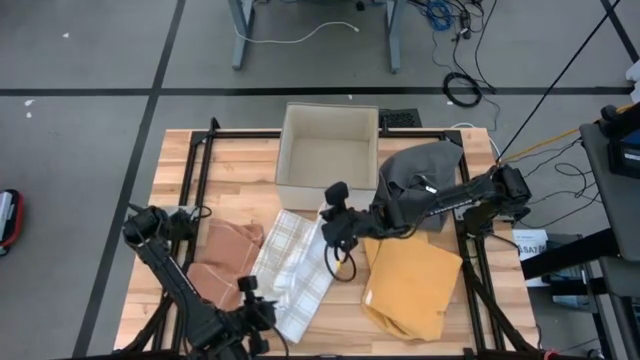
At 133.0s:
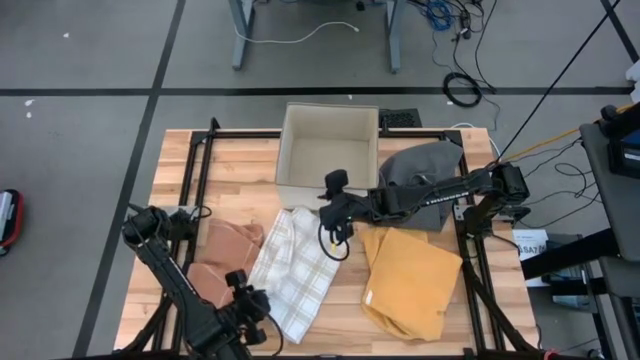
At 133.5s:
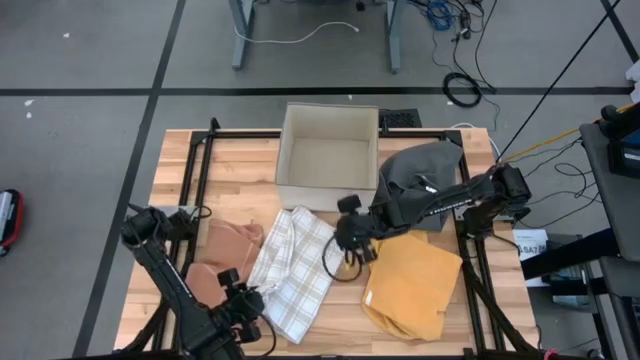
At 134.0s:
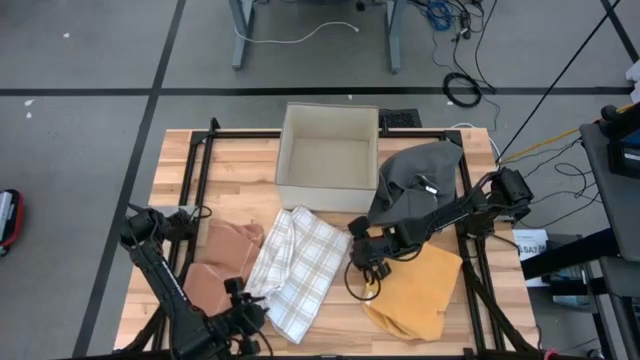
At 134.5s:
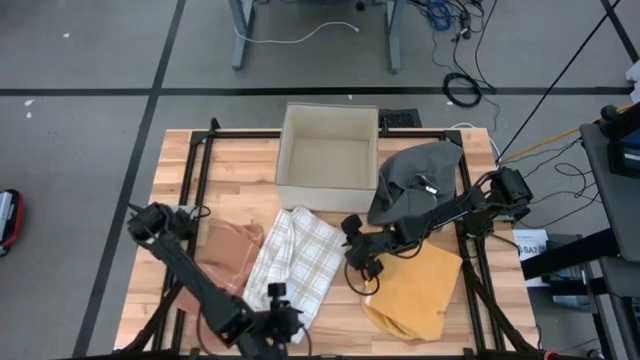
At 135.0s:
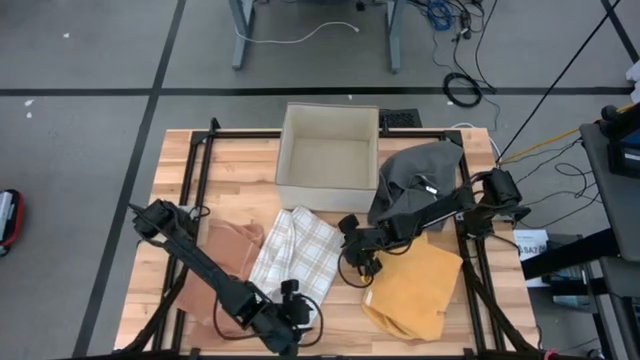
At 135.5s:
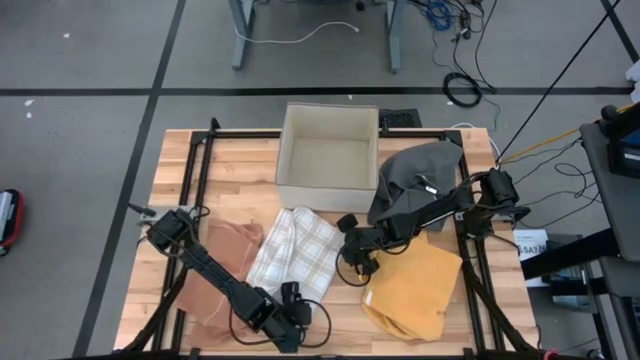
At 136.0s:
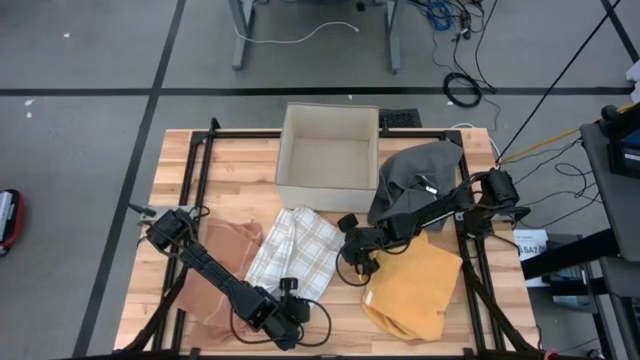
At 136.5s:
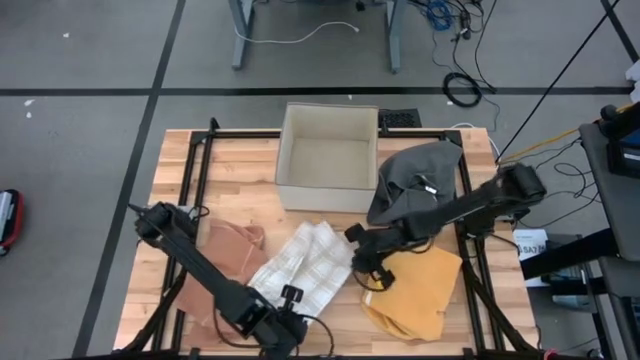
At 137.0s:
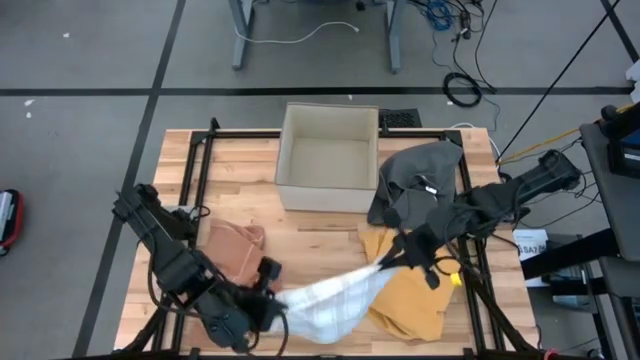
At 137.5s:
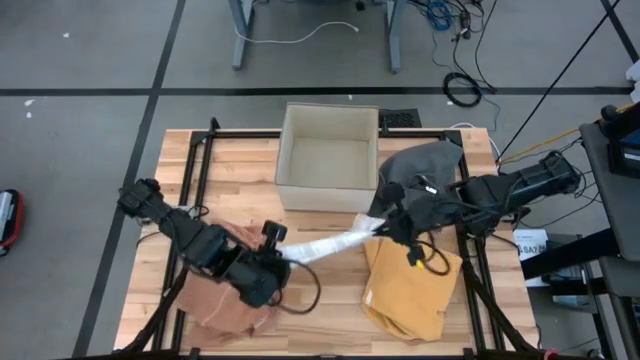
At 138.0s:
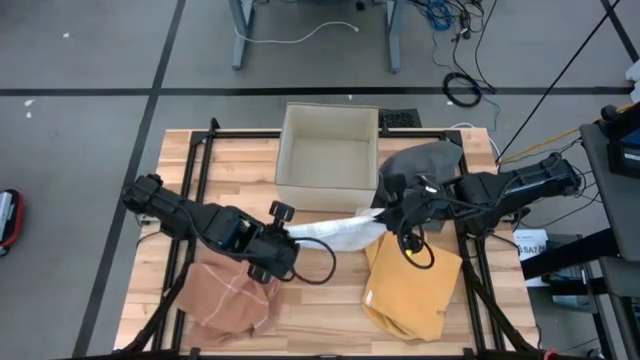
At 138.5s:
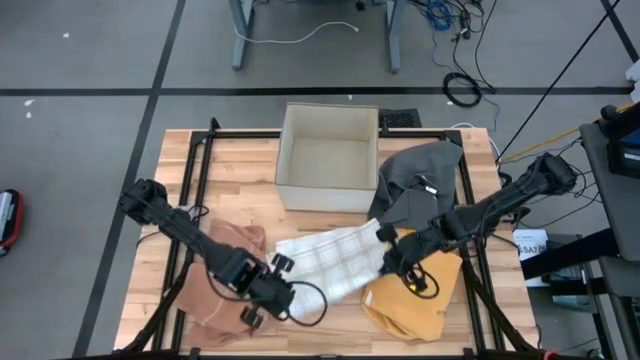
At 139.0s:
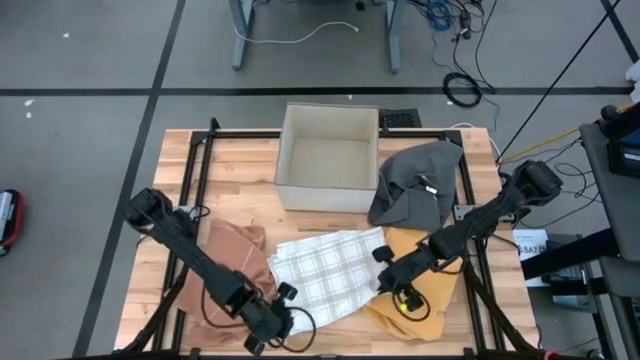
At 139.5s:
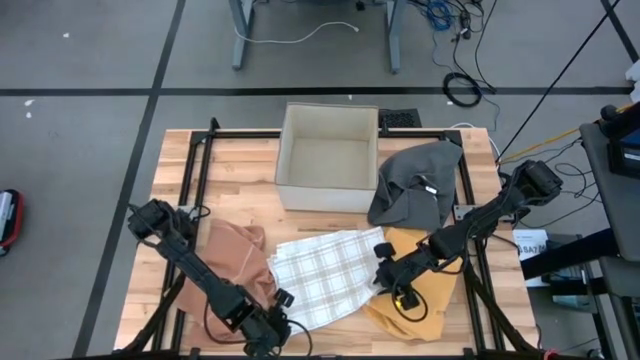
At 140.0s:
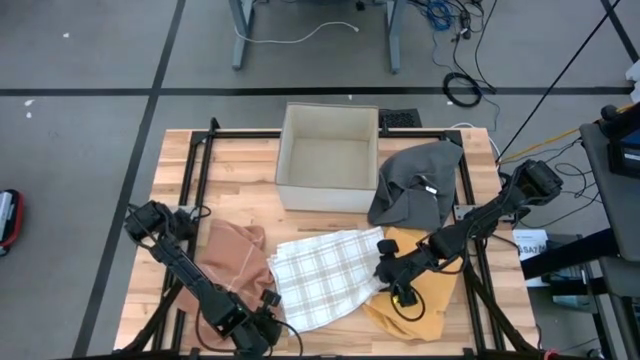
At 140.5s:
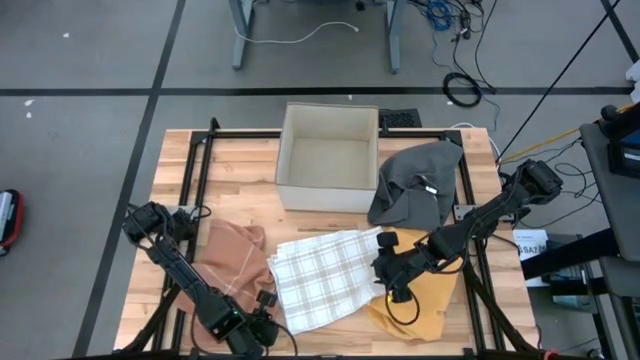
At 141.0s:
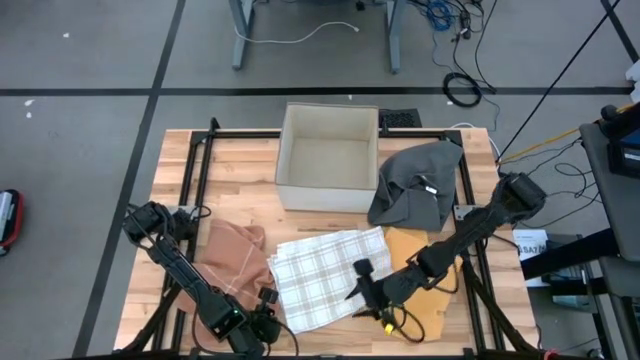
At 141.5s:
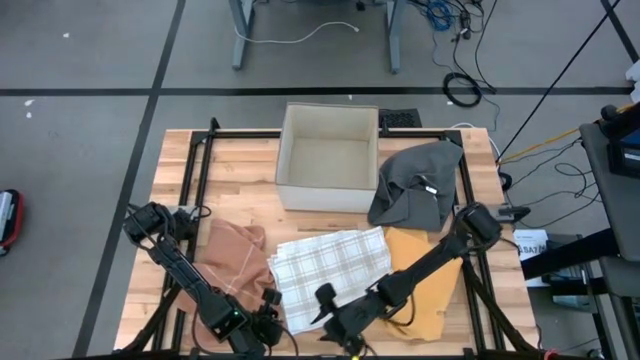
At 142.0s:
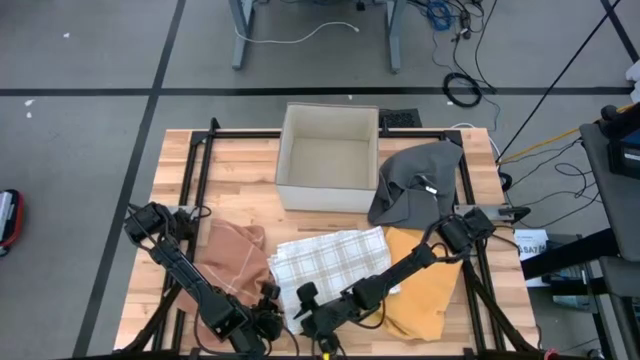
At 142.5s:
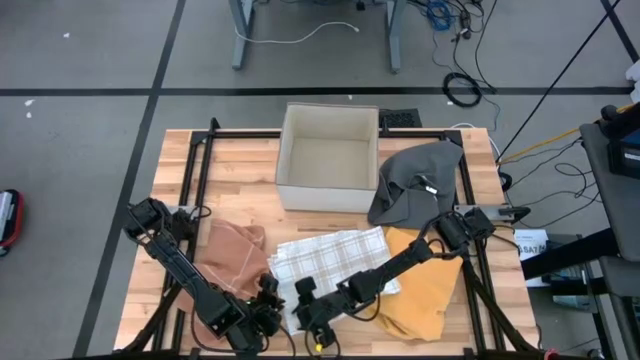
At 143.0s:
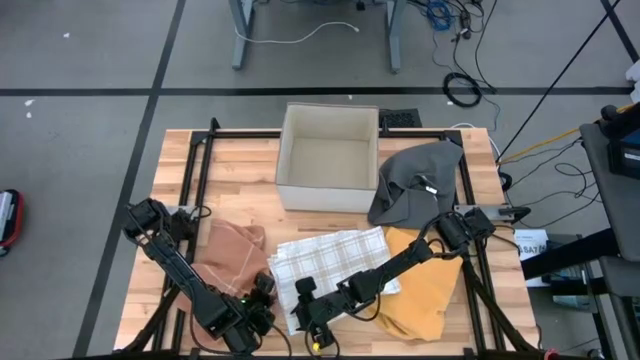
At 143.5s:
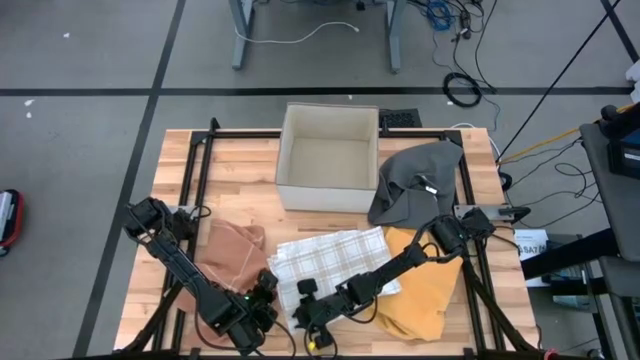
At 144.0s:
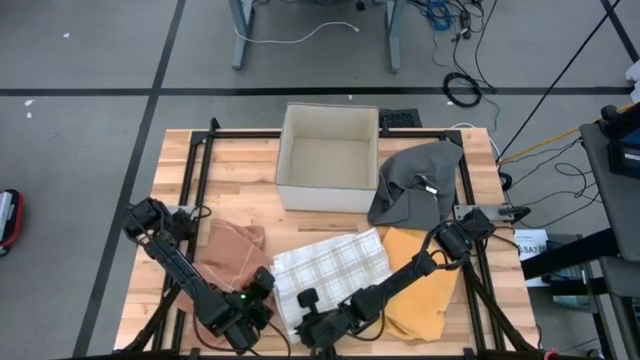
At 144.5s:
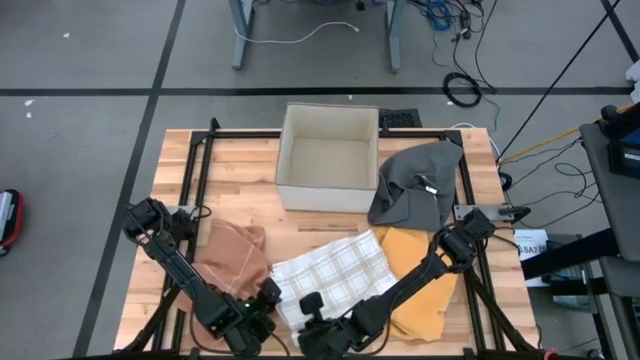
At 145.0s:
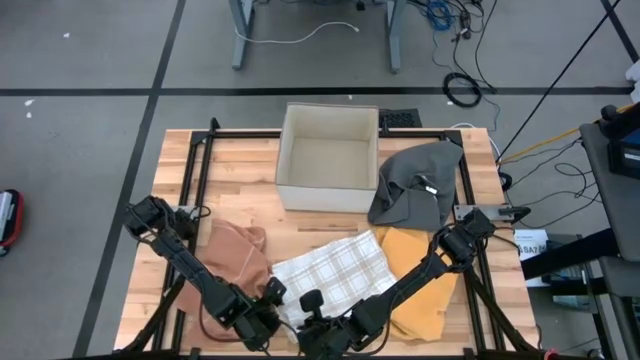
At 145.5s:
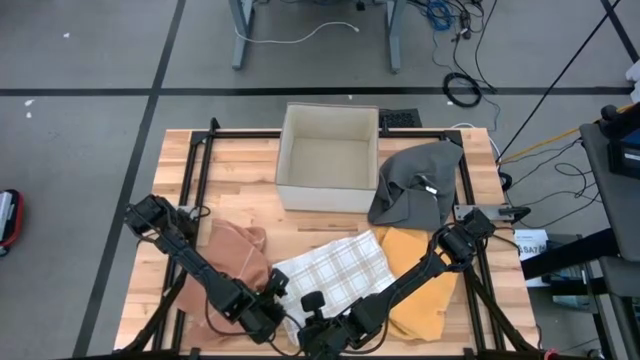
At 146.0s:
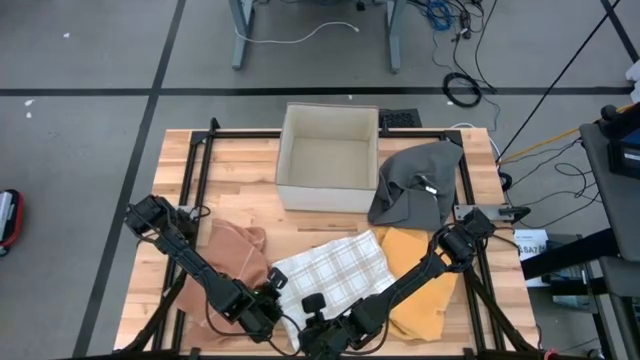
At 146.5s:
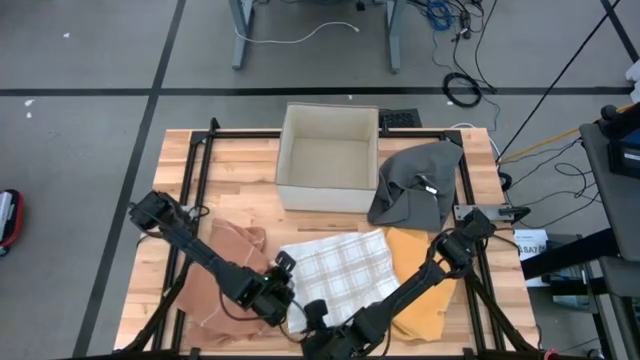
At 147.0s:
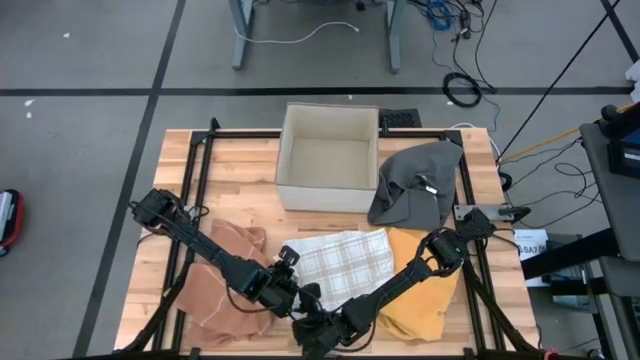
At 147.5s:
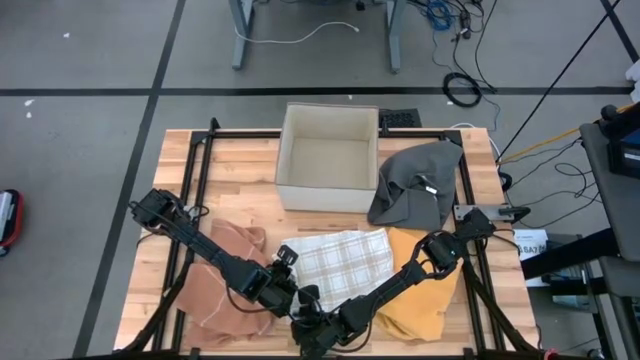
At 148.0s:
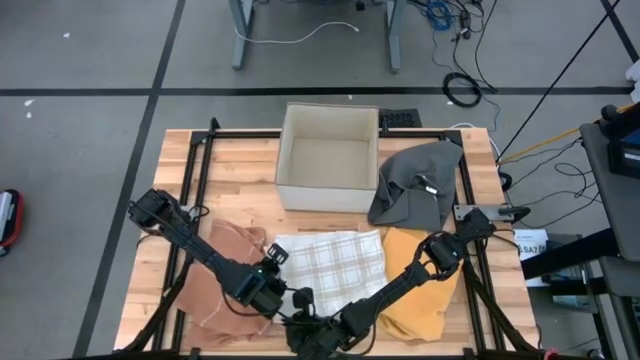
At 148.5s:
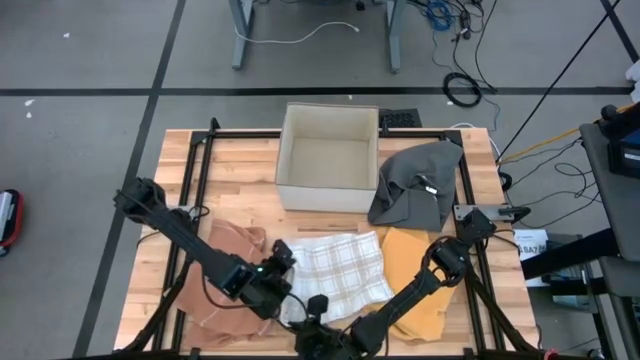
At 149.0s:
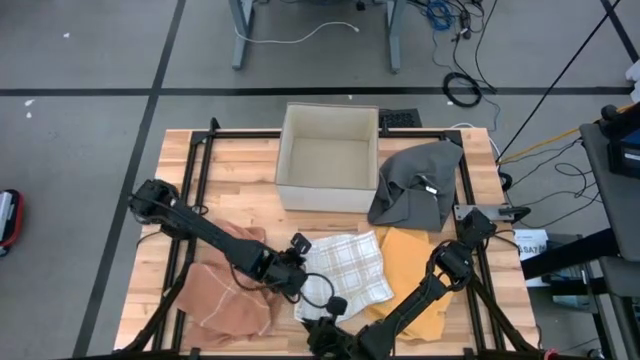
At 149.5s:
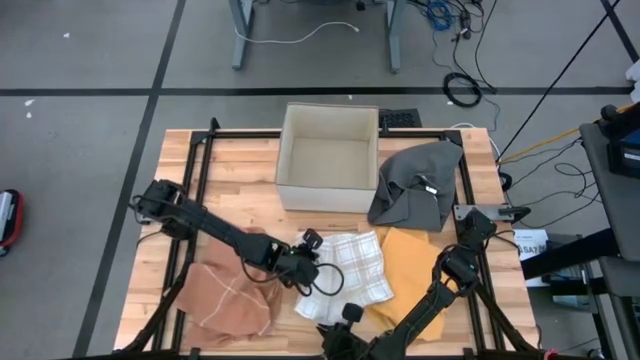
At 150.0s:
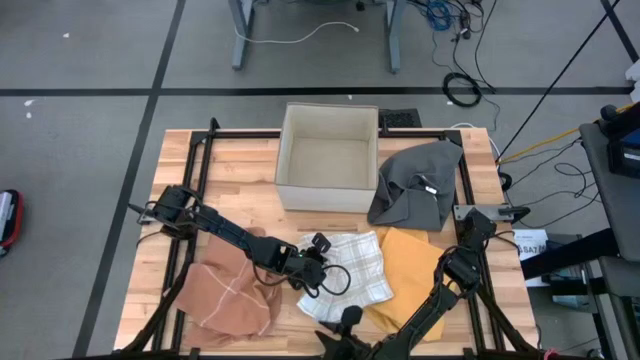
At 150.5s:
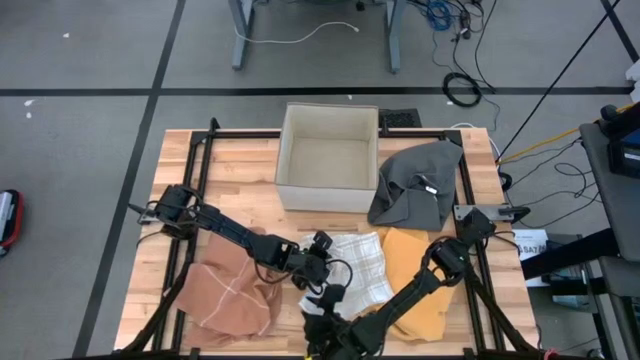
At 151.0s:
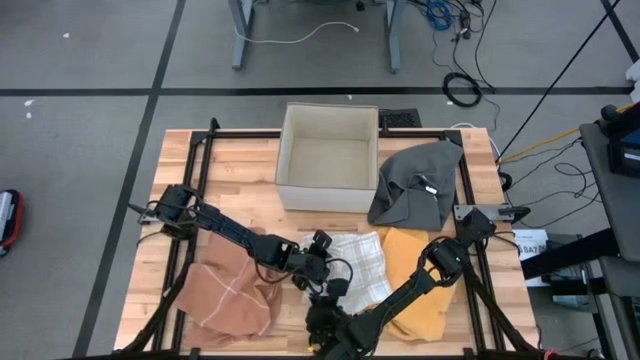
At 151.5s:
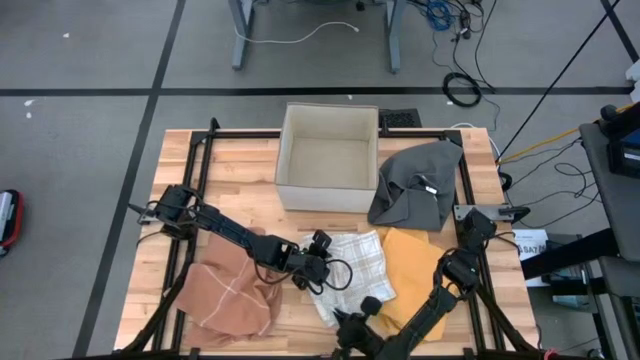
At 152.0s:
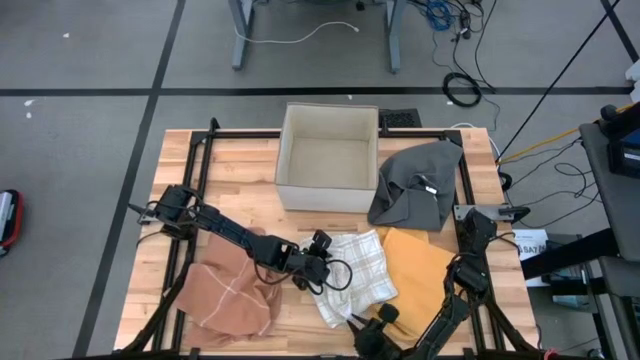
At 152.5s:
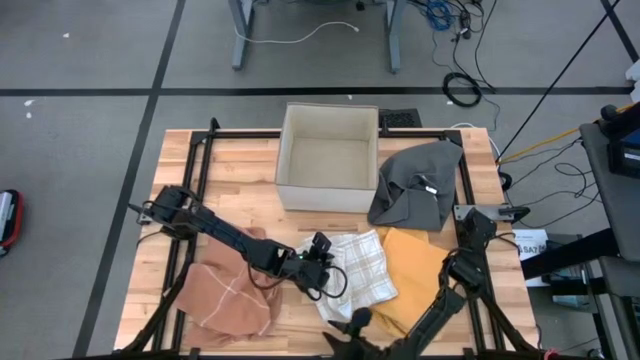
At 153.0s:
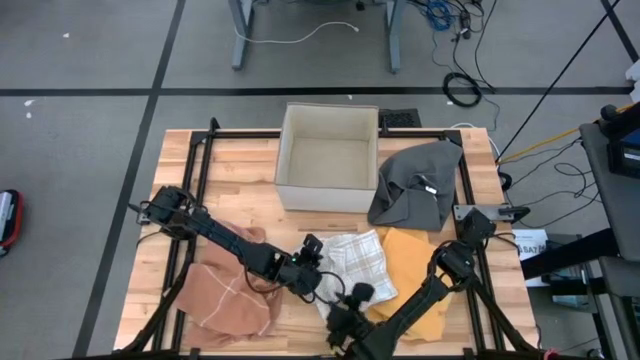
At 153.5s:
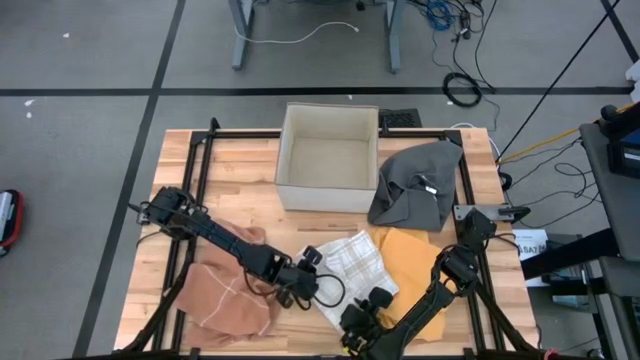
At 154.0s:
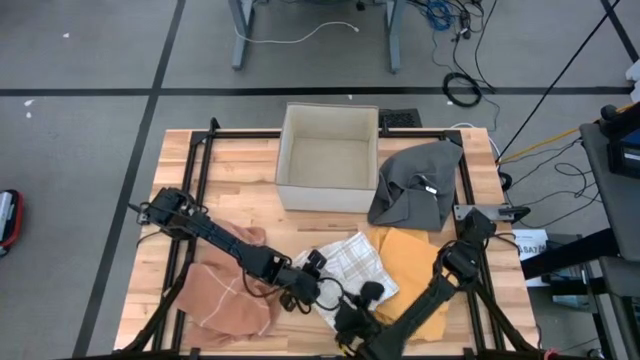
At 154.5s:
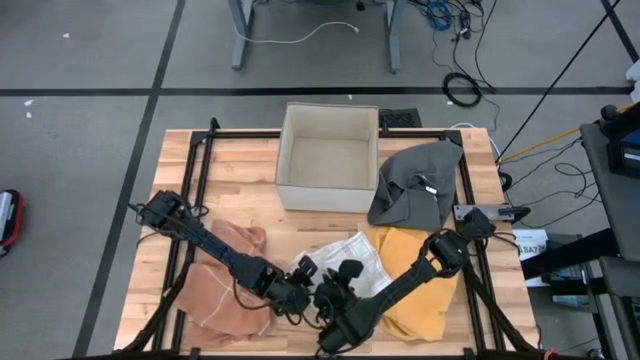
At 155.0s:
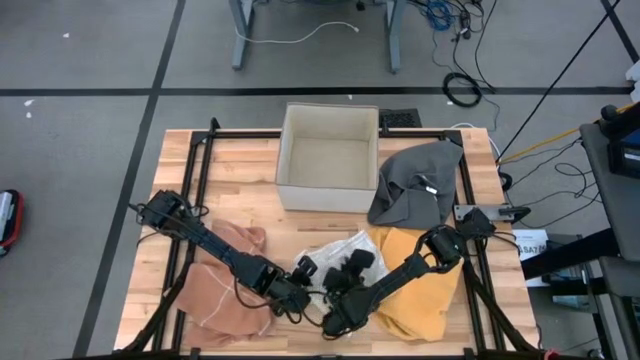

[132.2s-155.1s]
Task: Fold towel
Fold the white patterned towel
